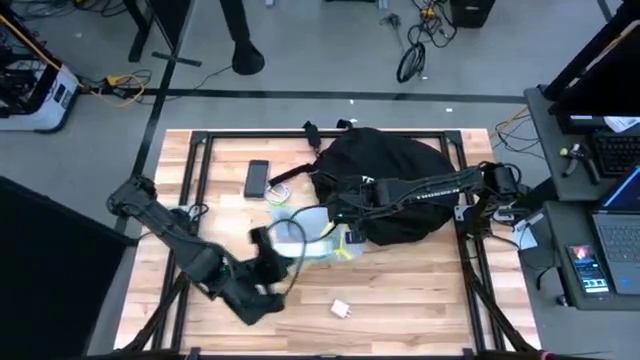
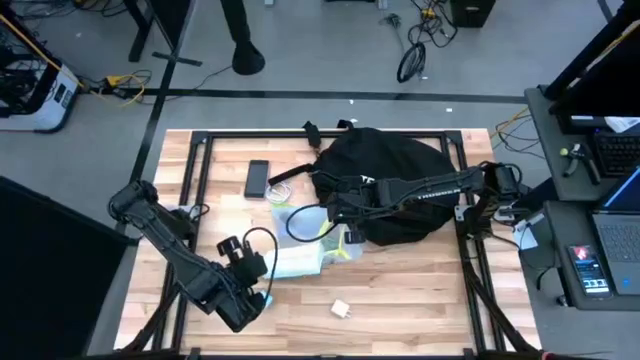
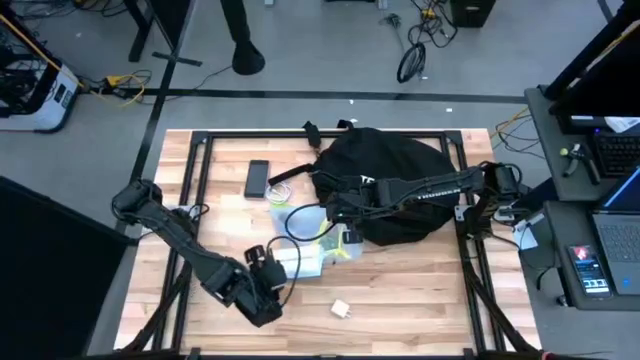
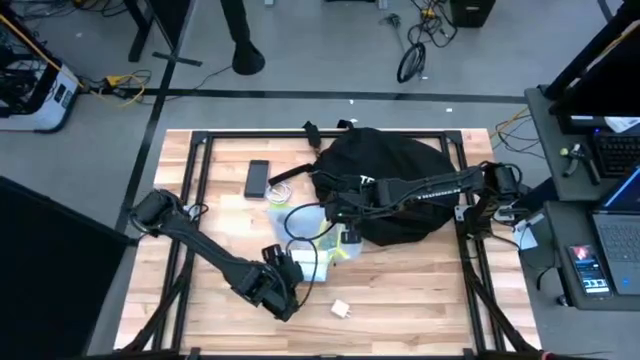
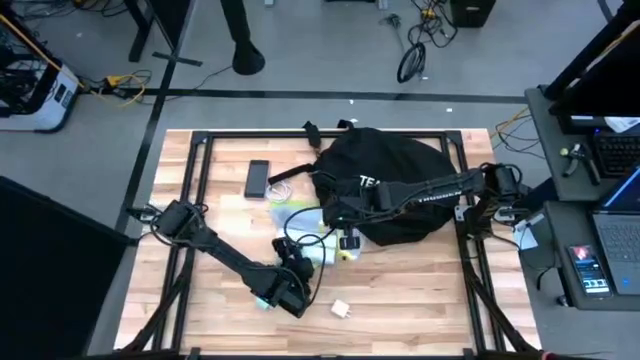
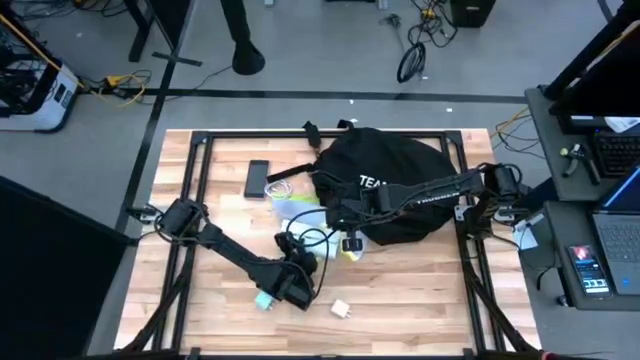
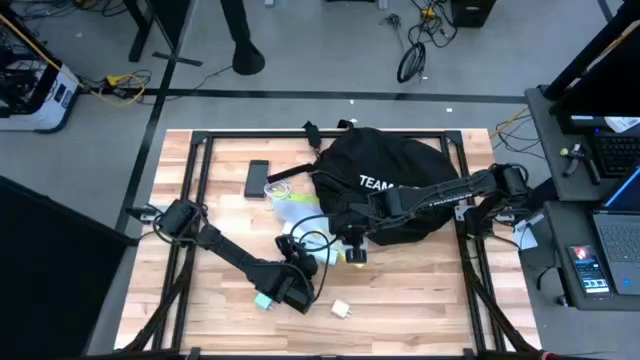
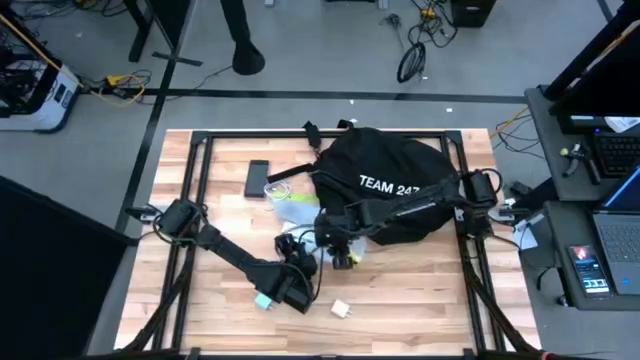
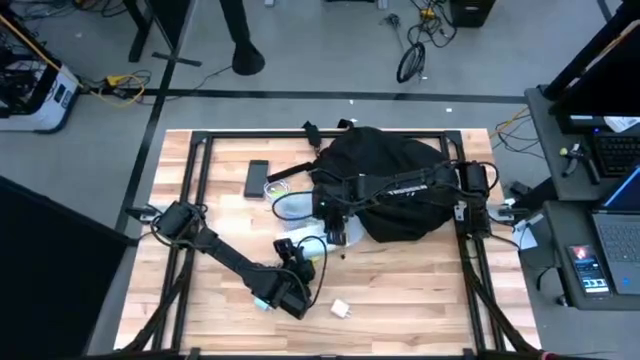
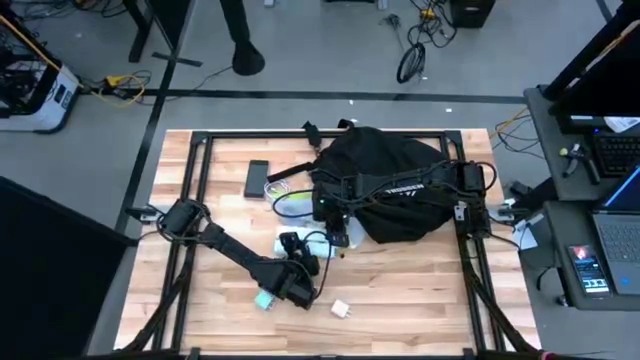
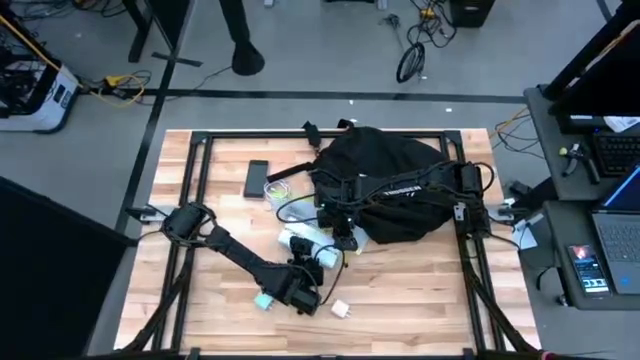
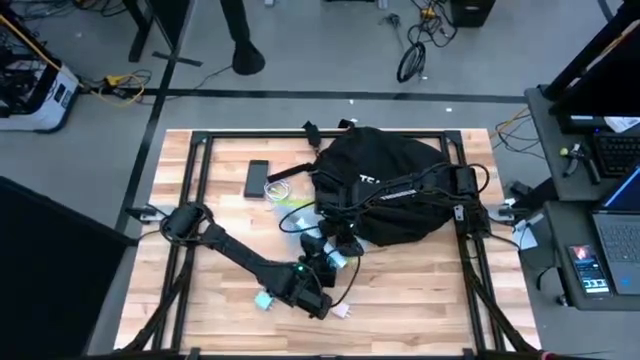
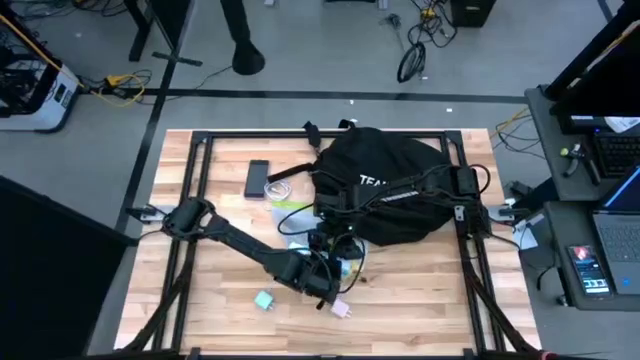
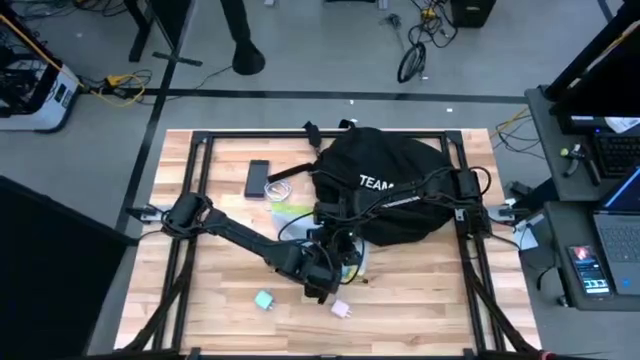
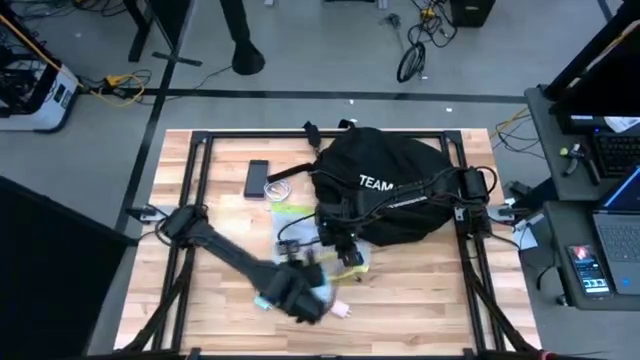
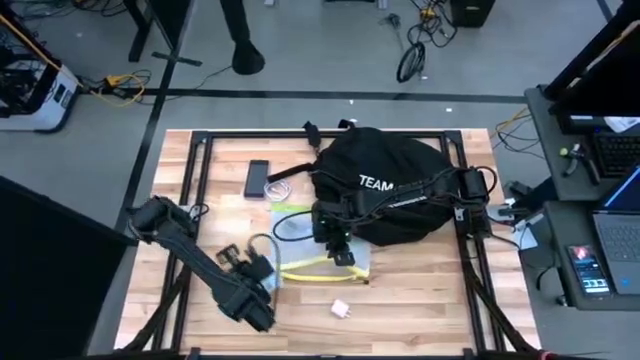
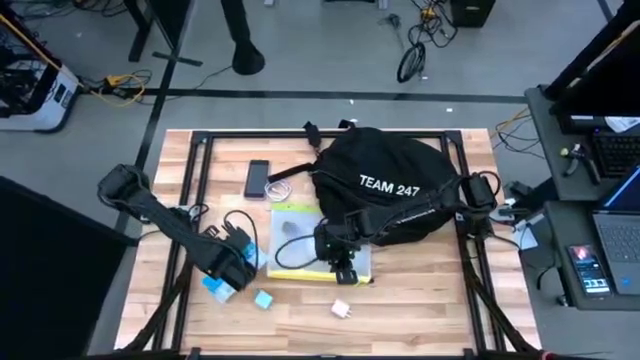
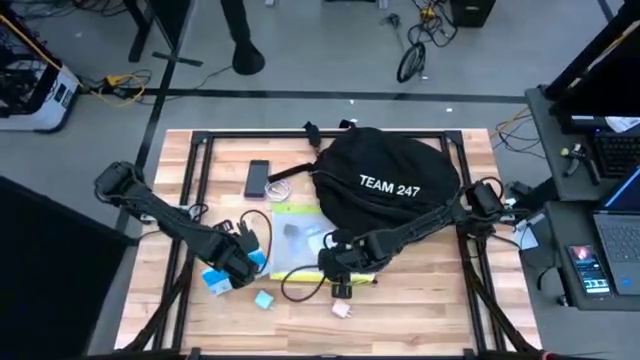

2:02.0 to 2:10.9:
Task: Unpack backpack
Remove the medicine organizer from the green zip bag

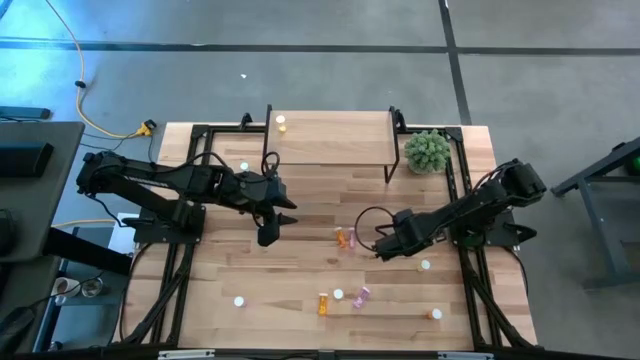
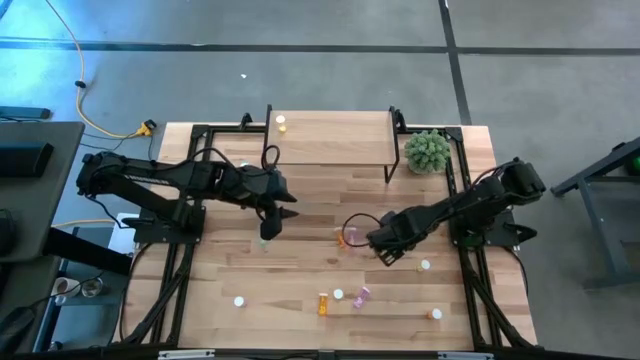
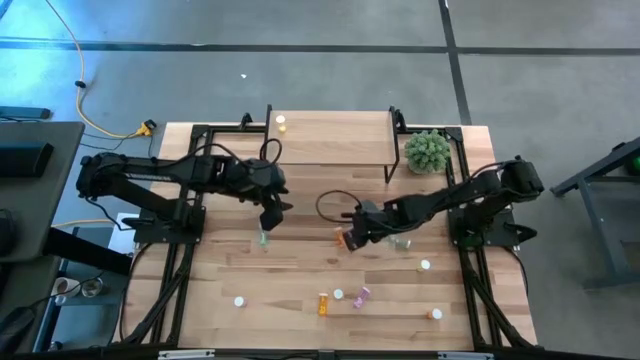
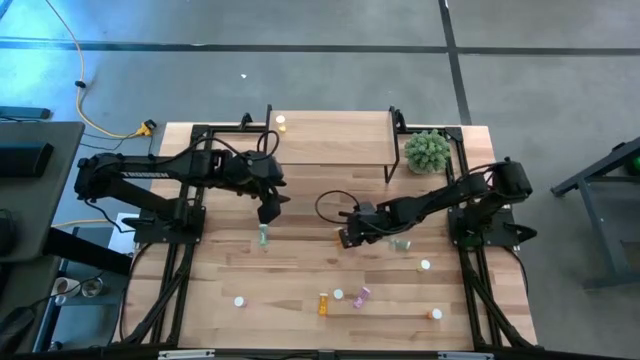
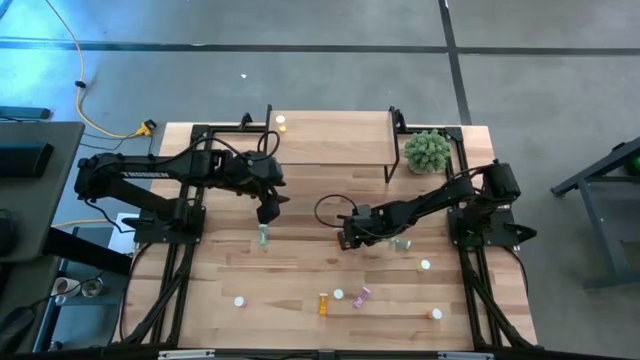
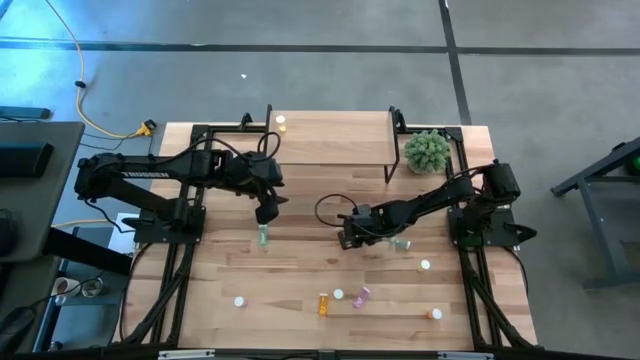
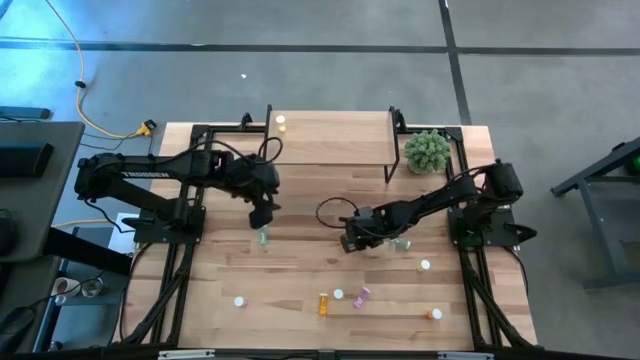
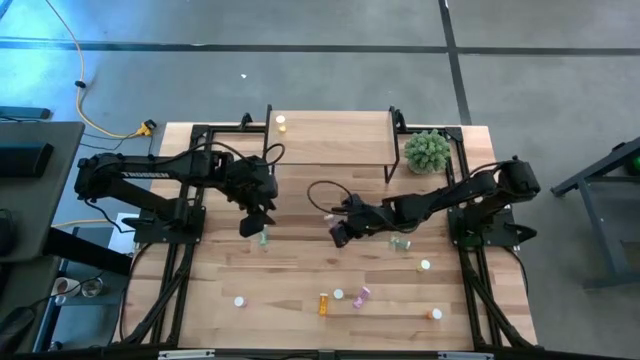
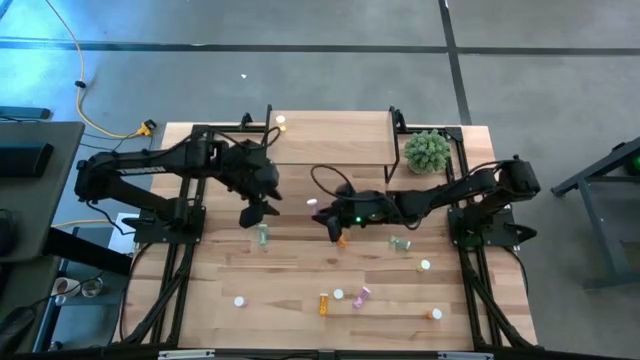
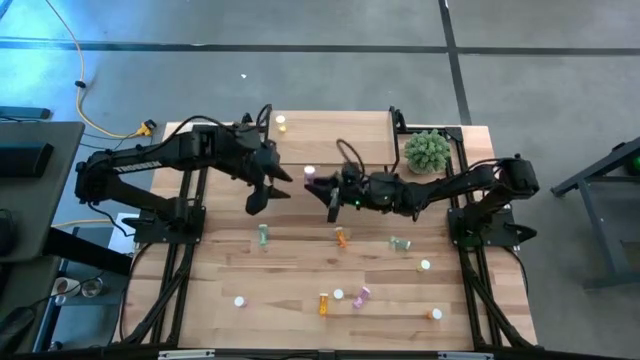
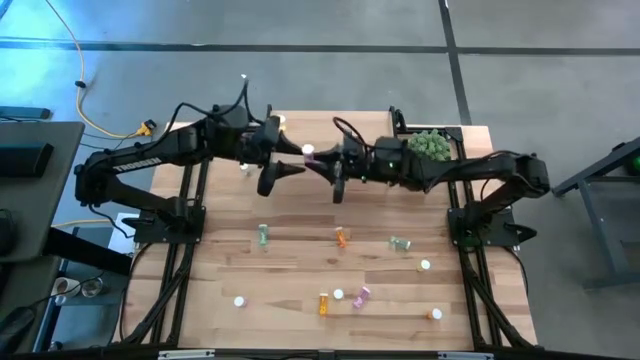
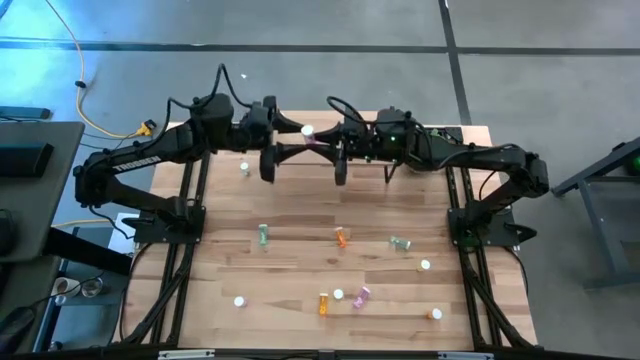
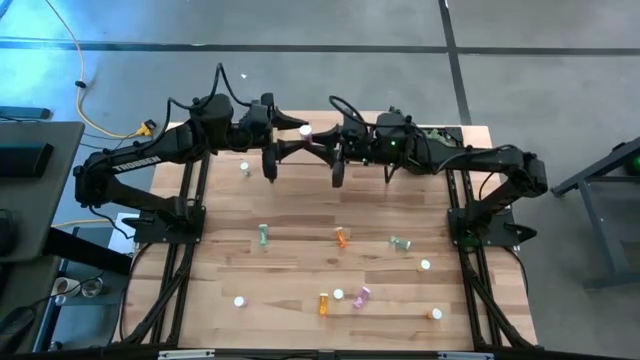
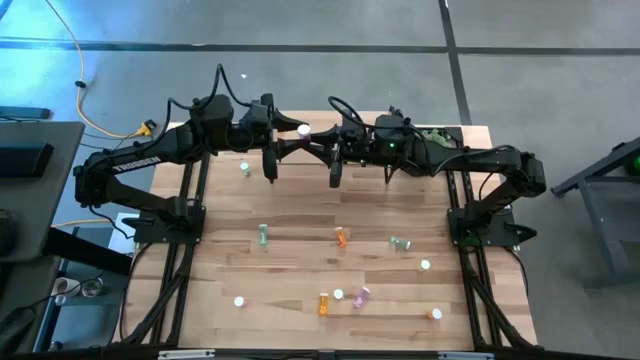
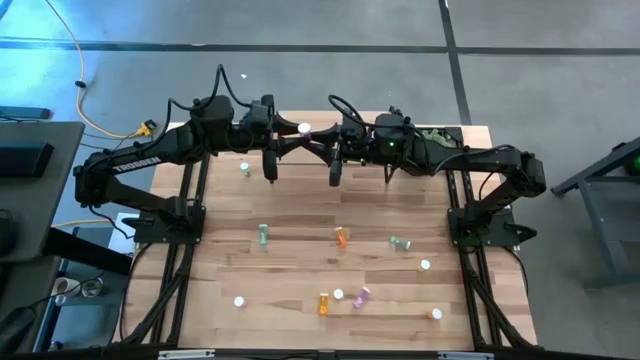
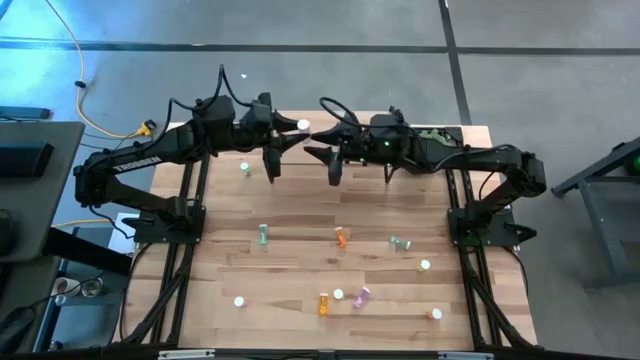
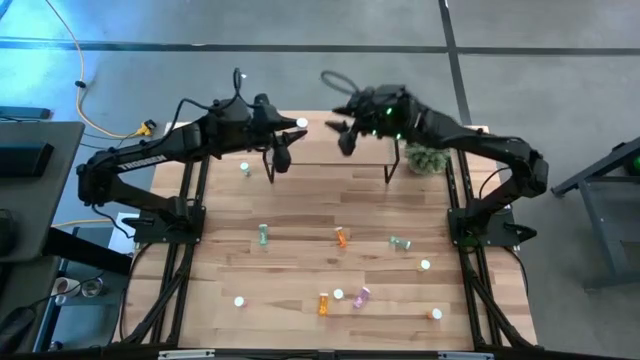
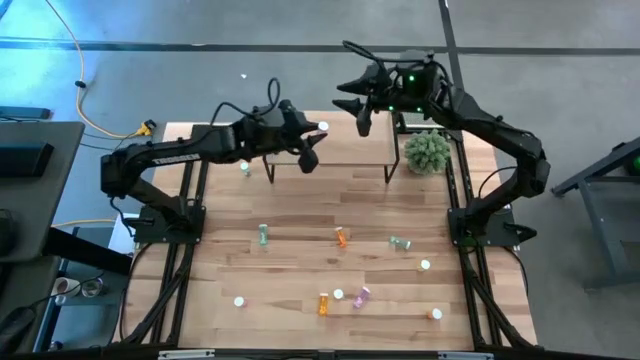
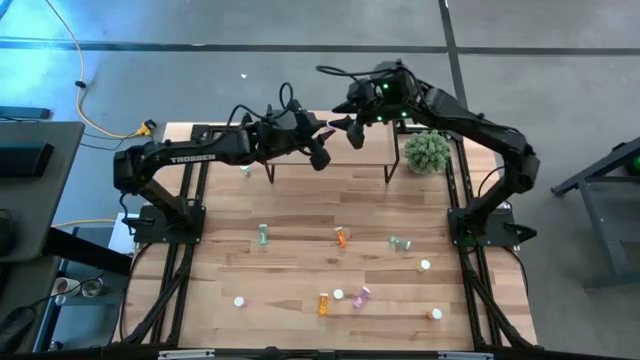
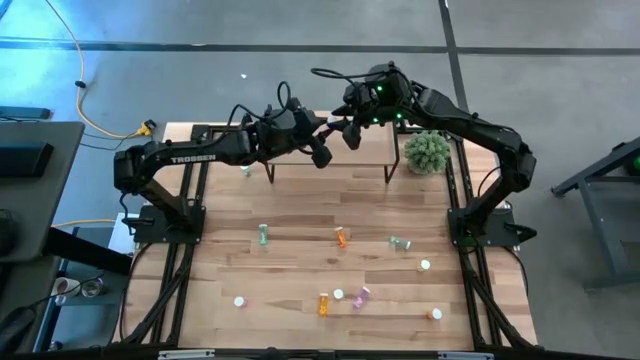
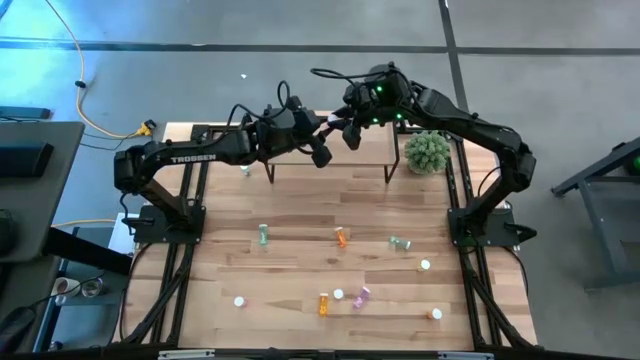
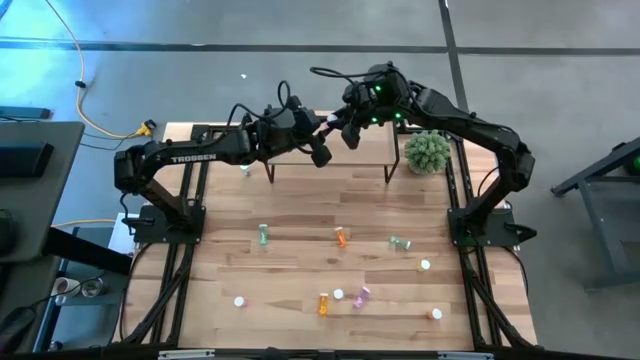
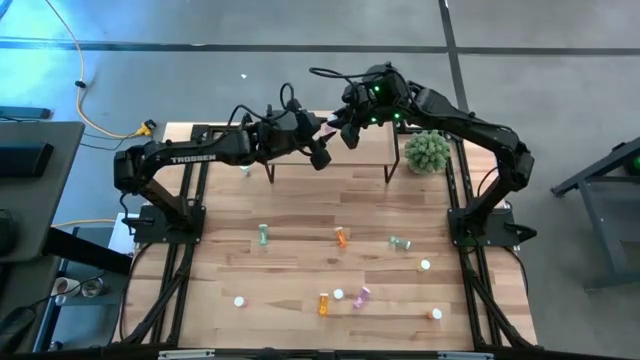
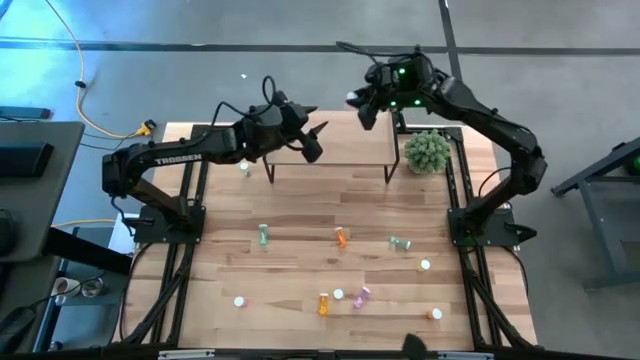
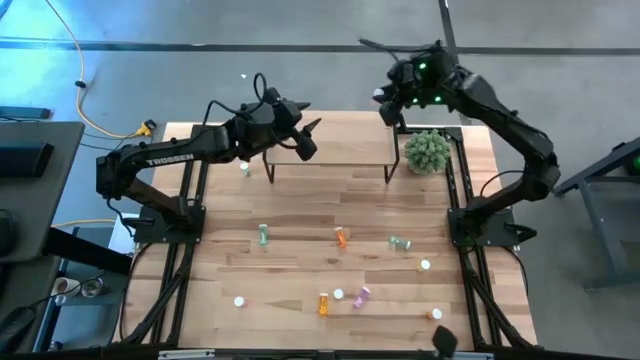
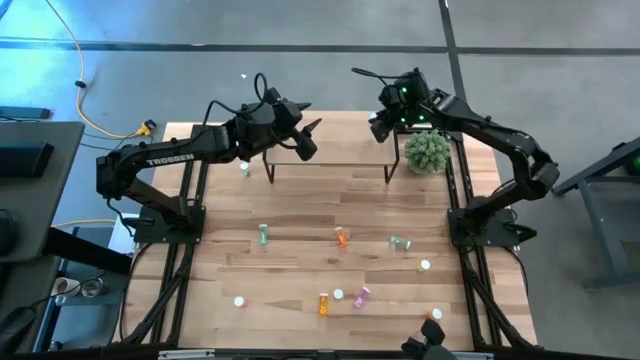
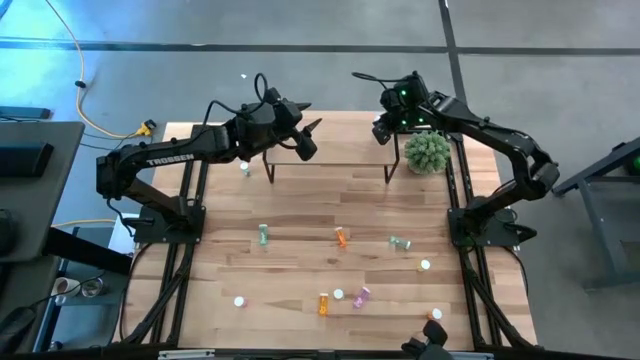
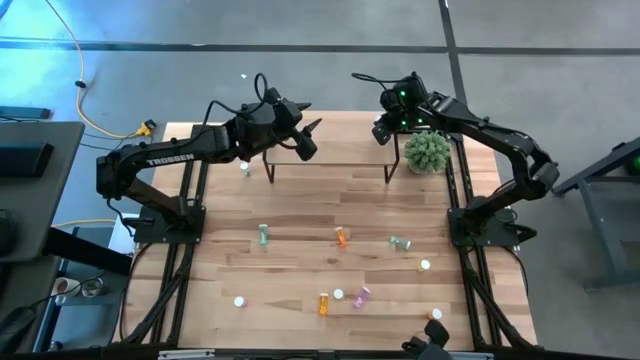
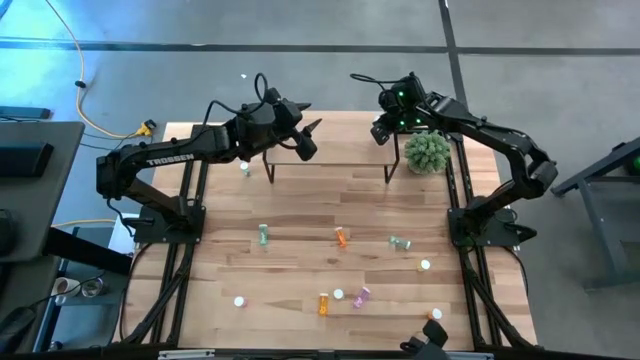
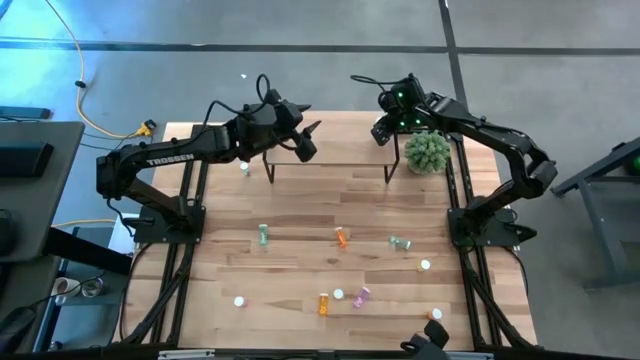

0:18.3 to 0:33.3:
Task: Pick and place medicine bottles onto shelf by color
Put the top pink pill bottle on the shelf
